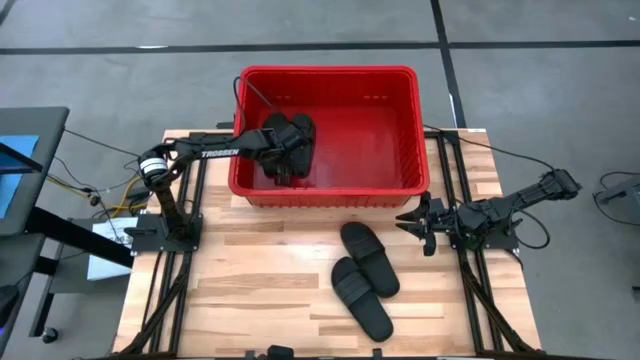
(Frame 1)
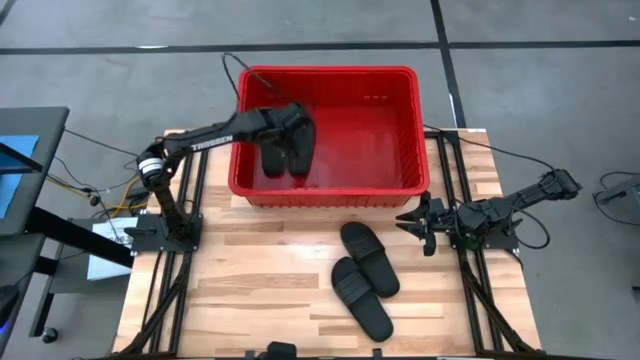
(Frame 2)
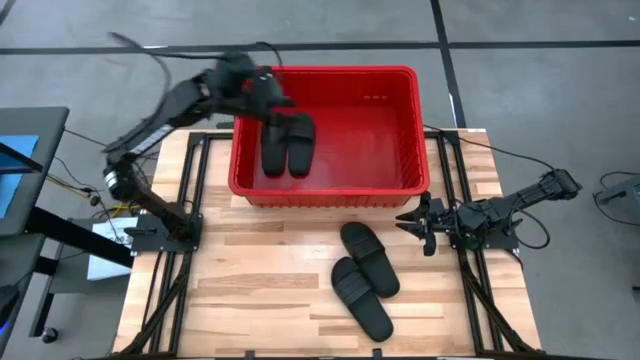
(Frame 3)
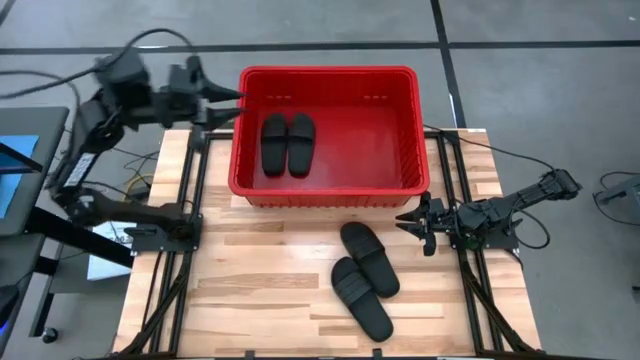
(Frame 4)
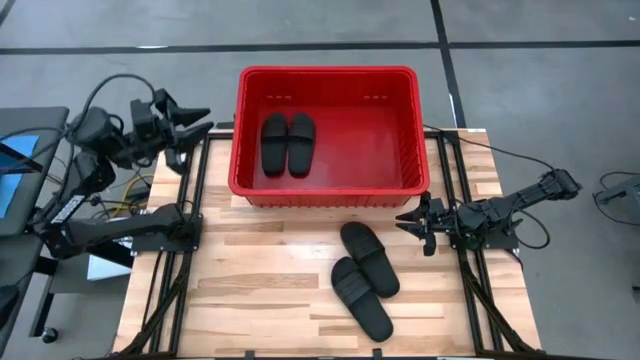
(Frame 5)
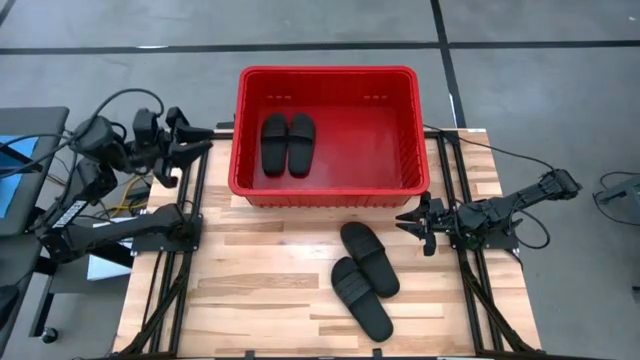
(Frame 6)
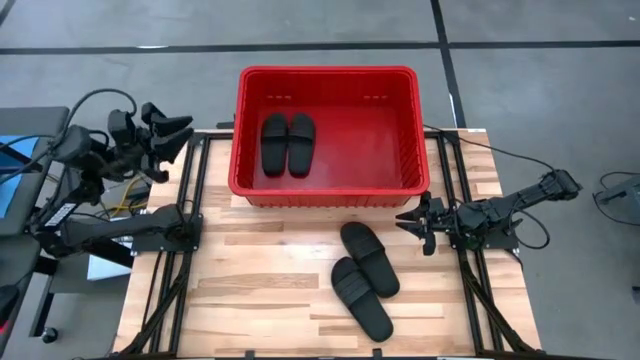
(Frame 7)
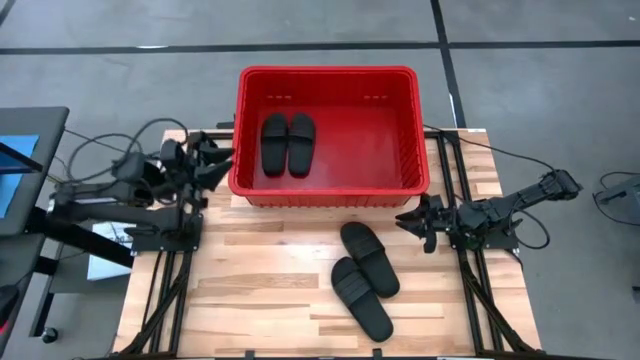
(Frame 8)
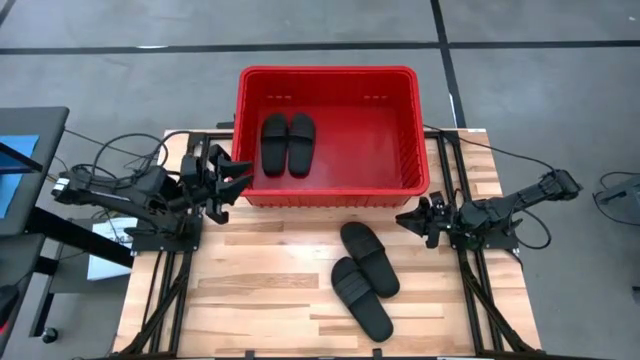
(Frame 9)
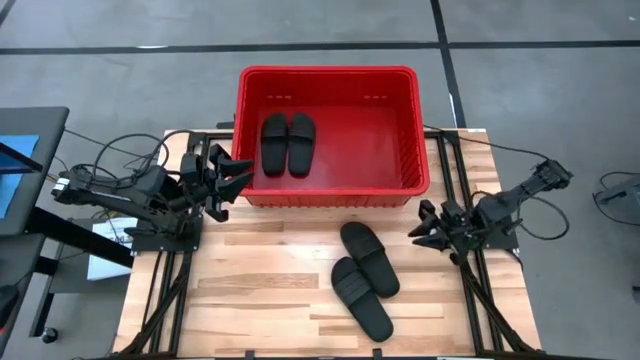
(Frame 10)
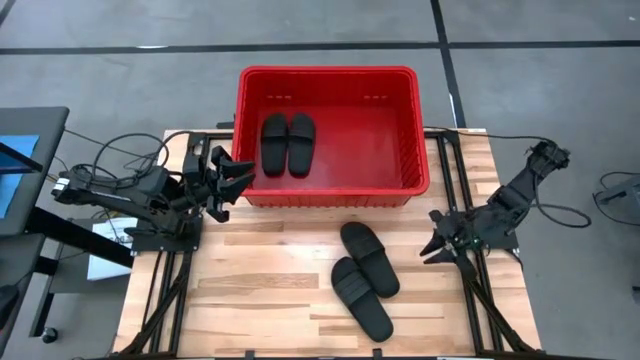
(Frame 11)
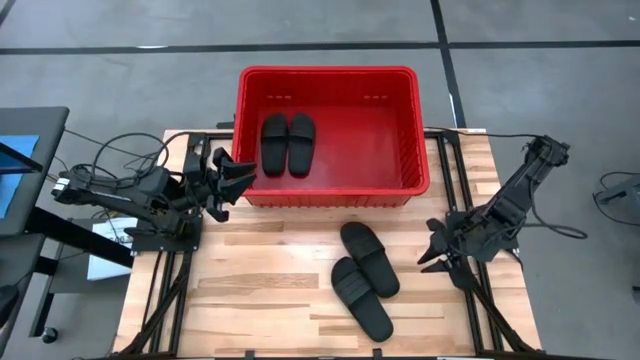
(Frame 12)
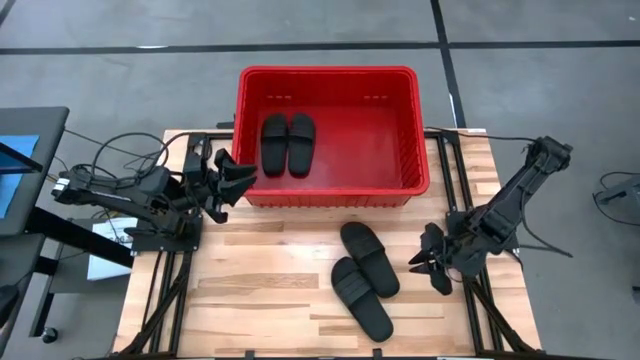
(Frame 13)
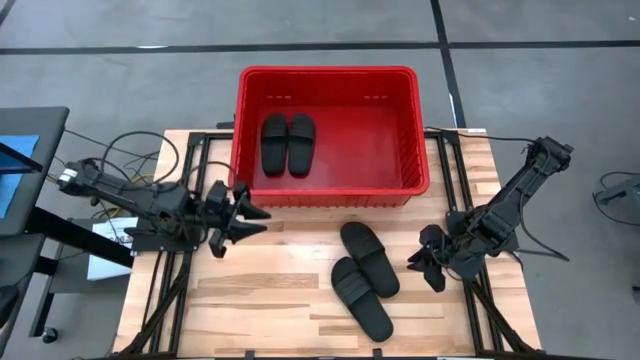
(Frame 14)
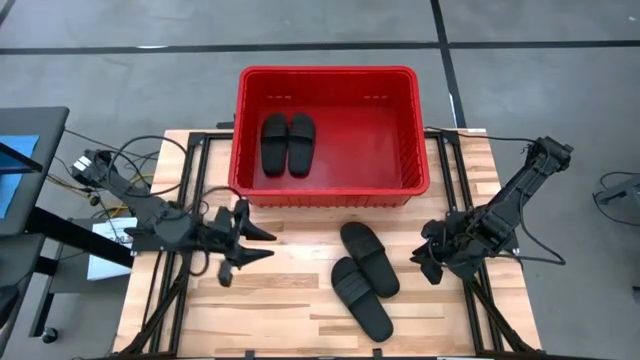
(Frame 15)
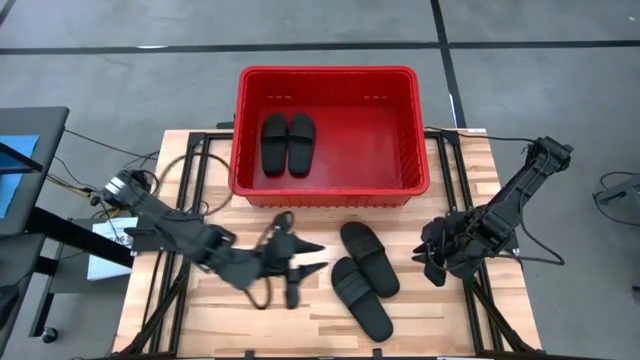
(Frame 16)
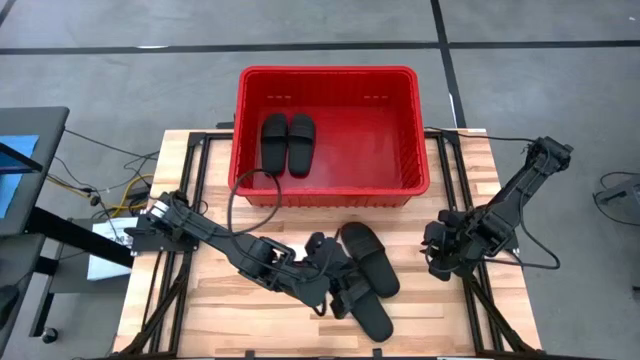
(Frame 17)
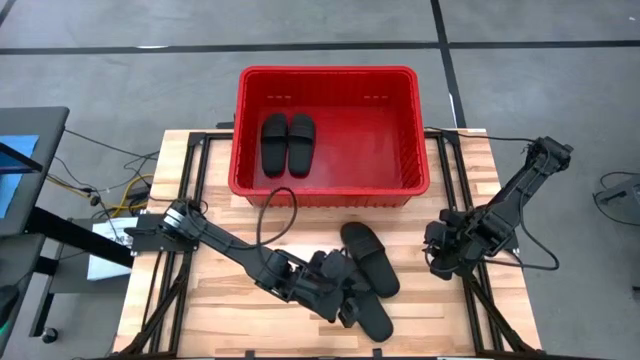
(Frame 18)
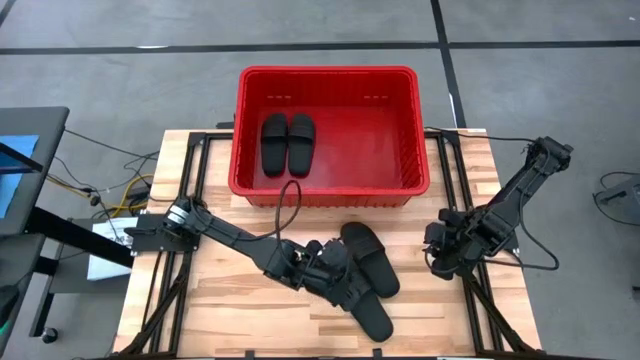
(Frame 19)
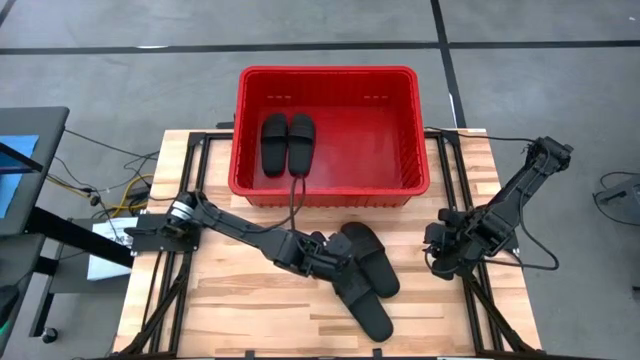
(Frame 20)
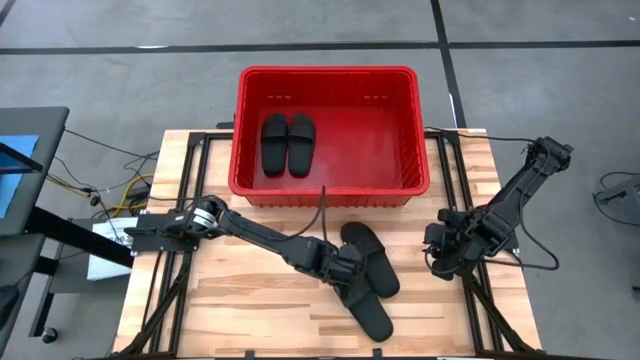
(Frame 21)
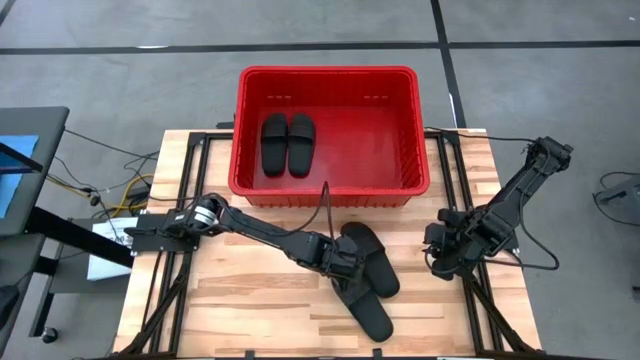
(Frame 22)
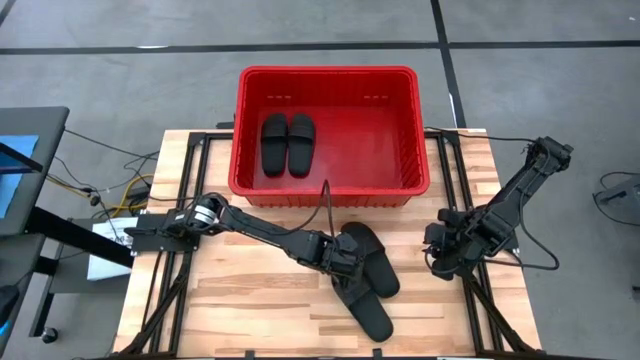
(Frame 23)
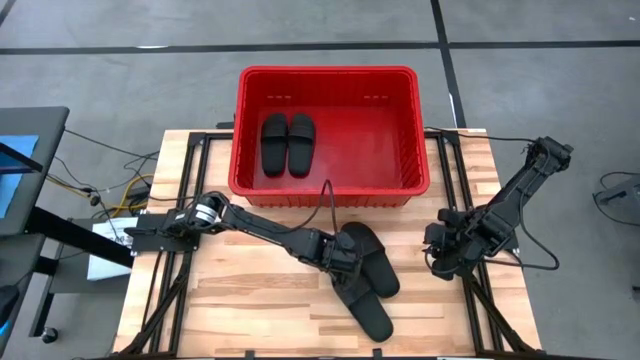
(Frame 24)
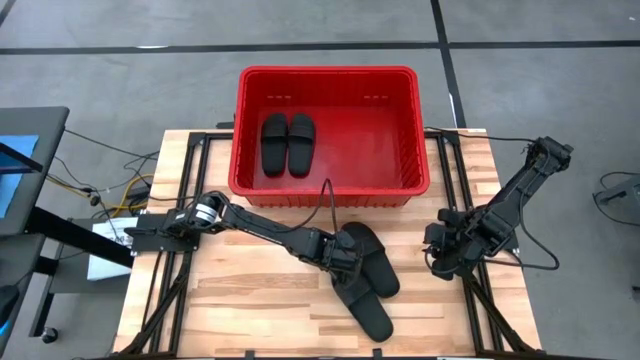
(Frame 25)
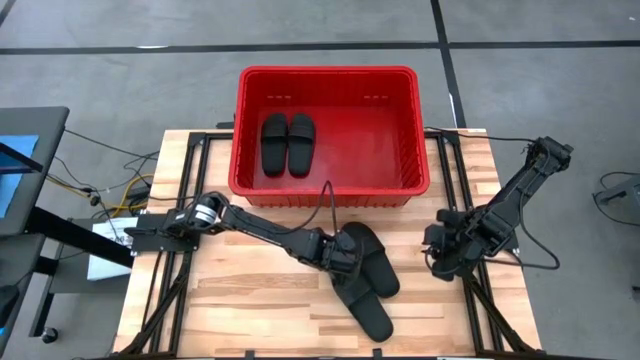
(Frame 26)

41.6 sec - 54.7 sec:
Task: Pick and place slides into bin
Put the black slide into the red organizer bin

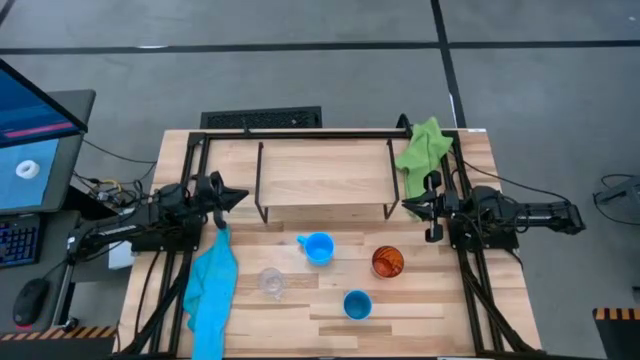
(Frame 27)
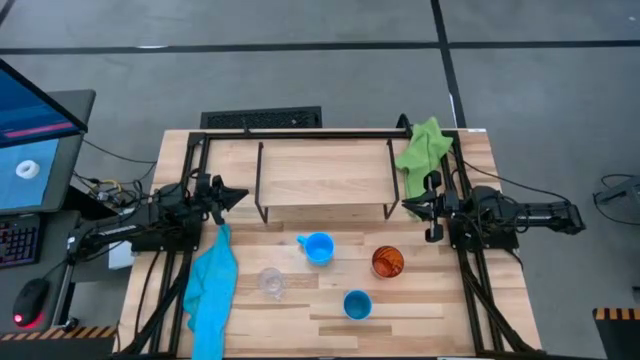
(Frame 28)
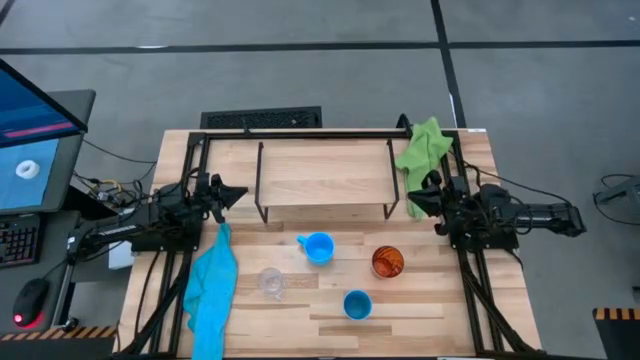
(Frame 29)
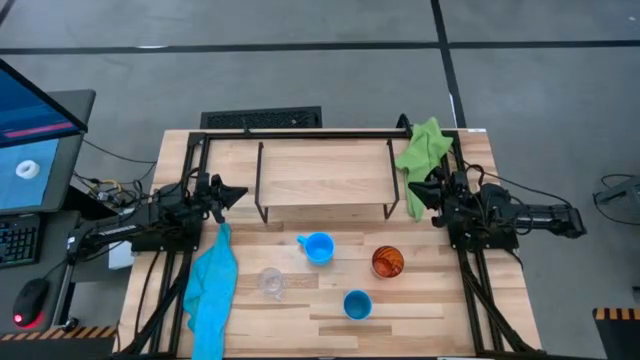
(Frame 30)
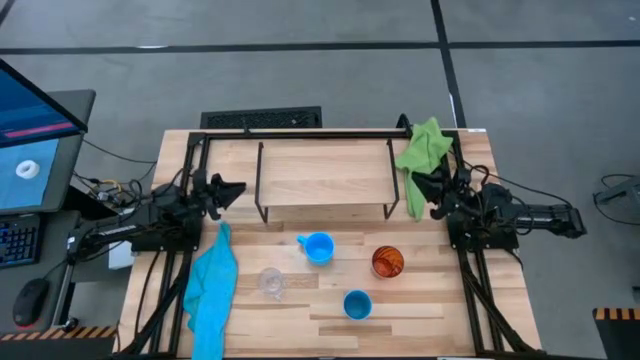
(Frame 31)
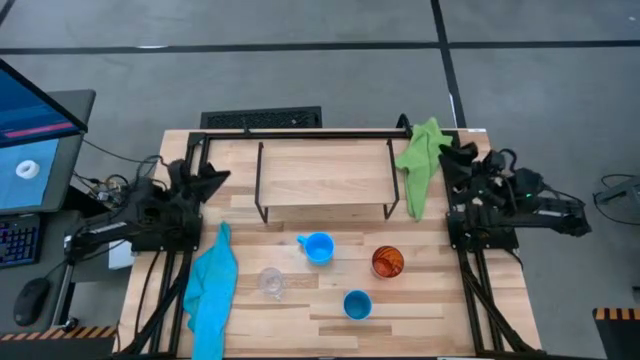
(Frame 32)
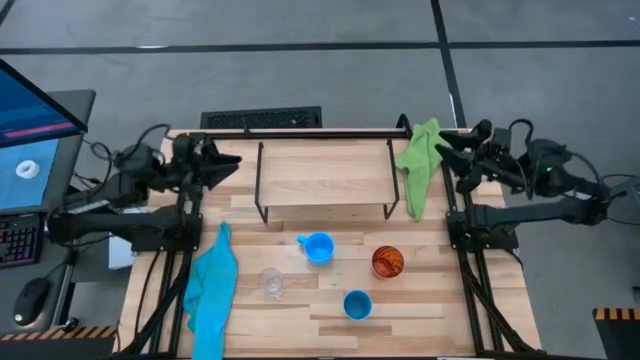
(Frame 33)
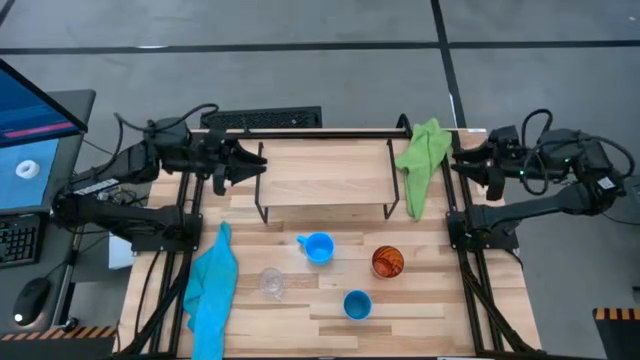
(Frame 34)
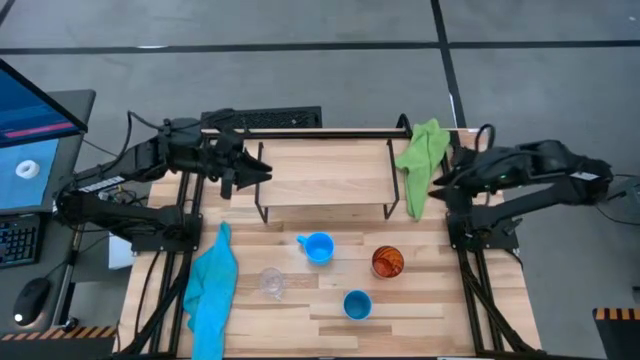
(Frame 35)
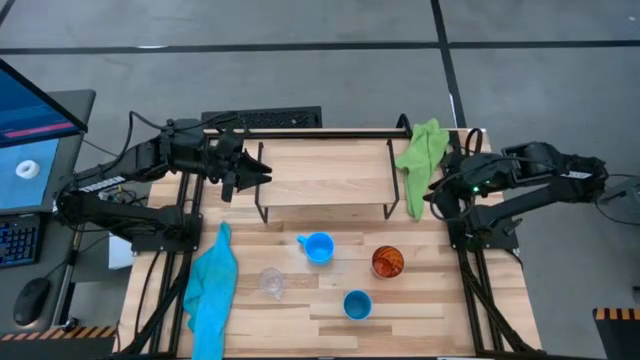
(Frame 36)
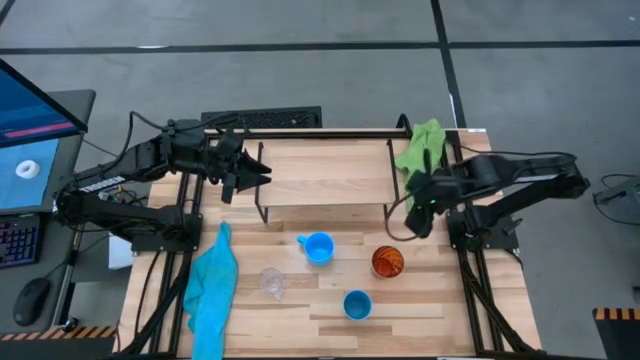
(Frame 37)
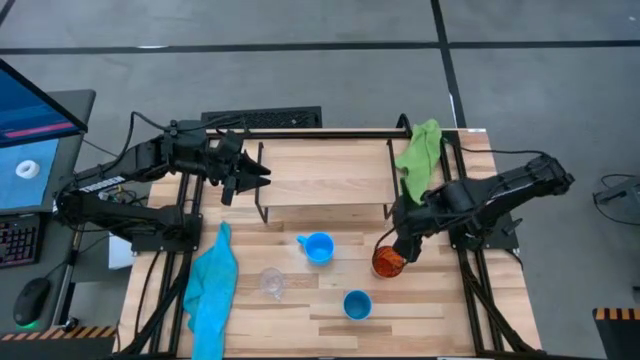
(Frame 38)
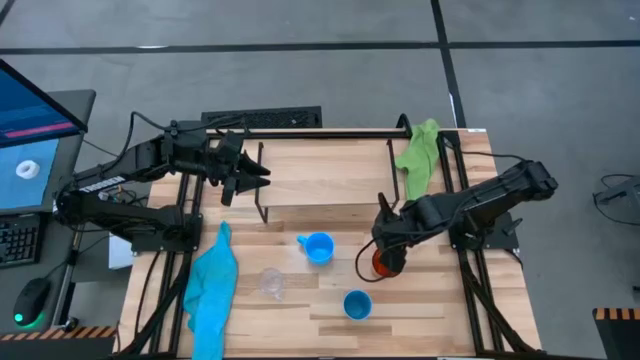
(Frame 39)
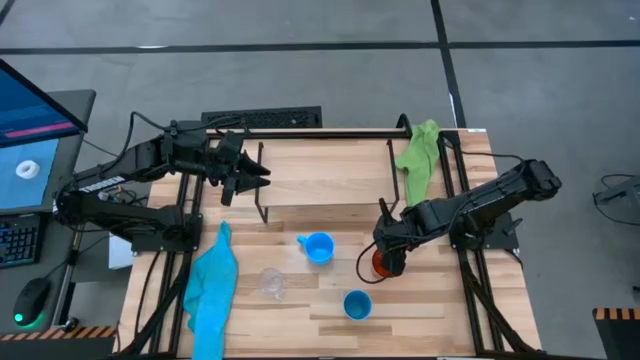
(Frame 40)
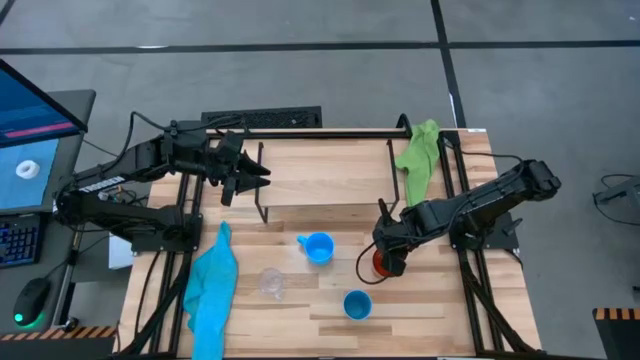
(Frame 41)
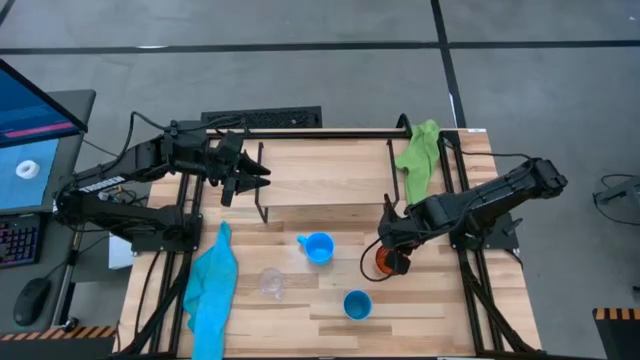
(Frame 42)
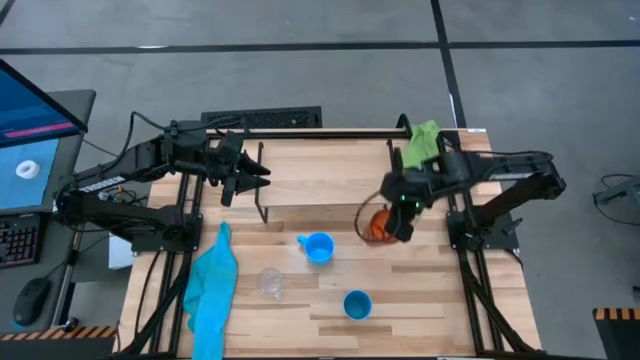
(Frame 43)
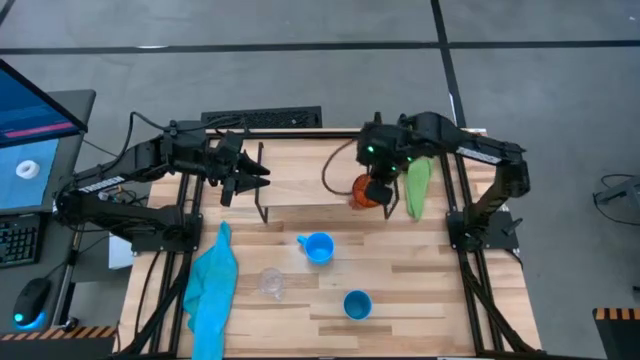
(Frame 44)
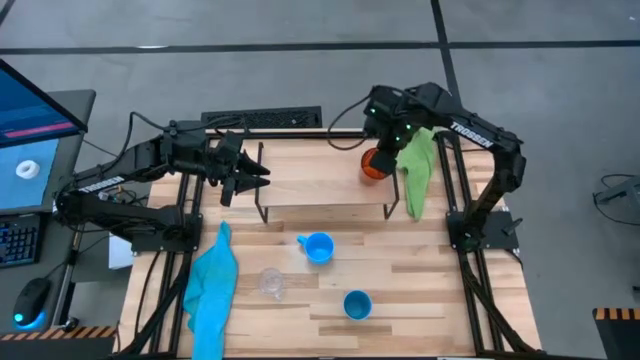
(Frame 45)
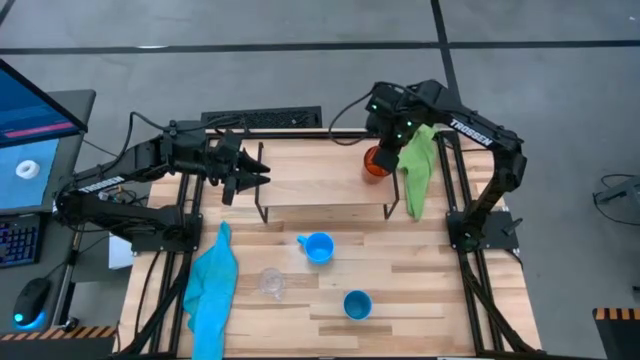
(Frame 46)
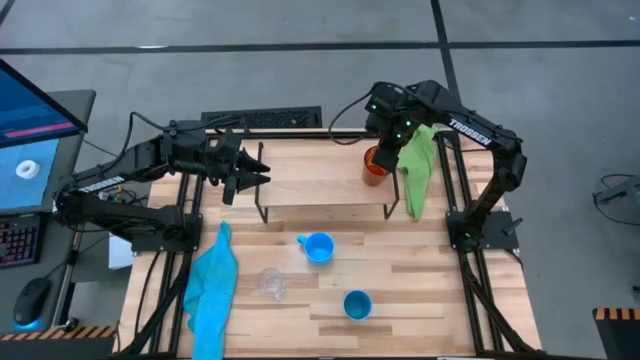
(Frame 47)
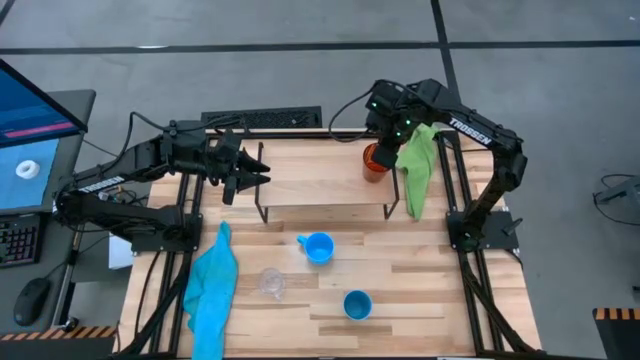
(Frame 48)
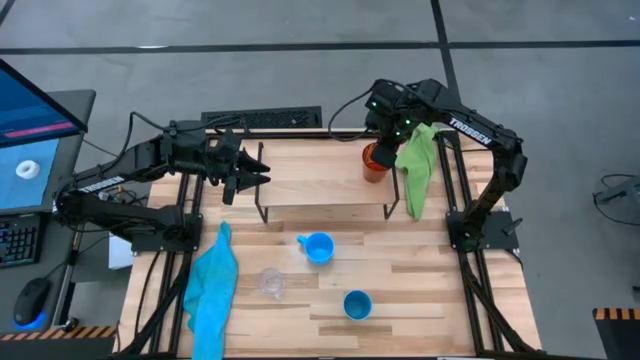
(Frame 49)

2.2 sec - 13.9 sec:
Task: Stack small to large cups/mugs on shelf
Put the orange cup on the shelf
